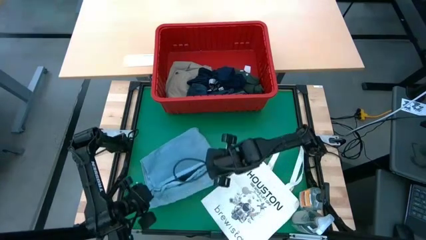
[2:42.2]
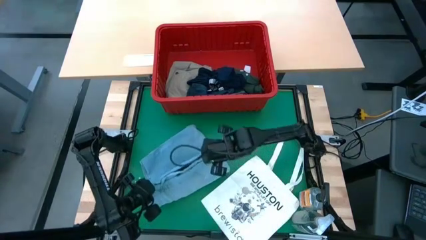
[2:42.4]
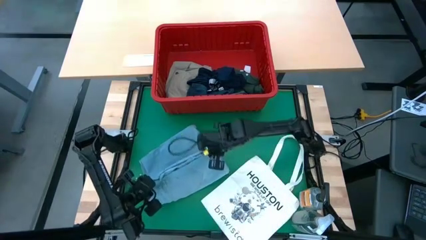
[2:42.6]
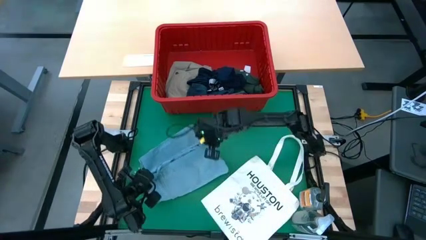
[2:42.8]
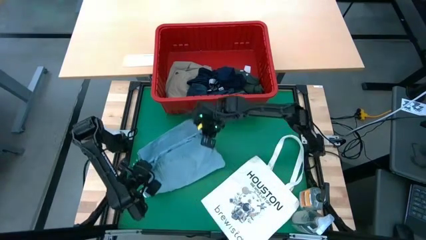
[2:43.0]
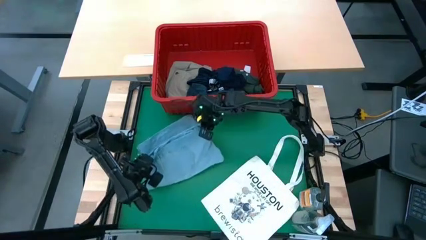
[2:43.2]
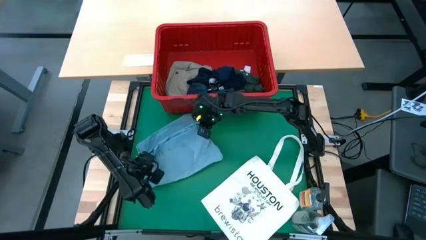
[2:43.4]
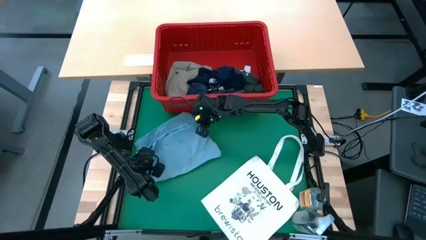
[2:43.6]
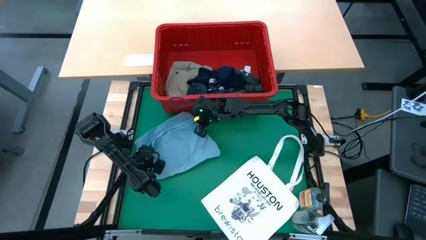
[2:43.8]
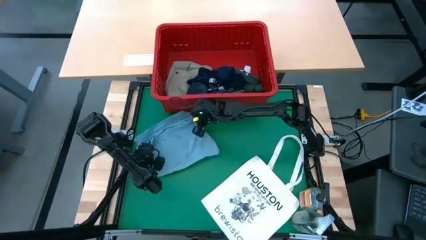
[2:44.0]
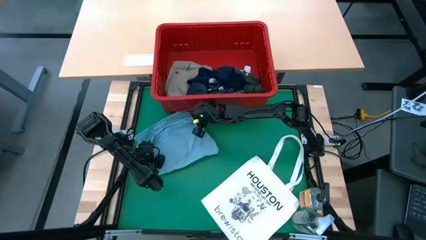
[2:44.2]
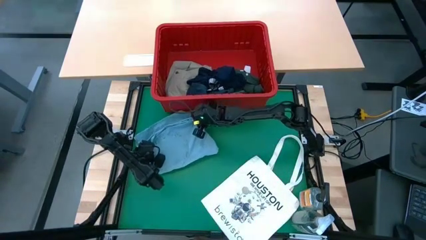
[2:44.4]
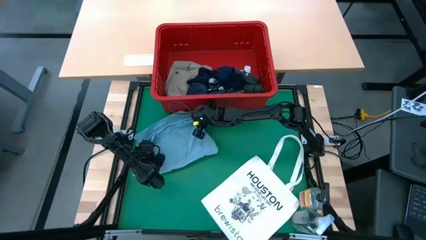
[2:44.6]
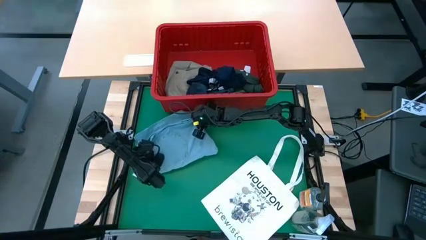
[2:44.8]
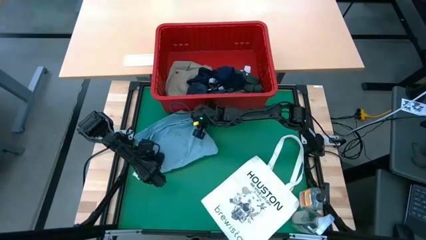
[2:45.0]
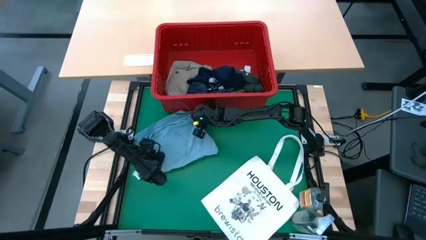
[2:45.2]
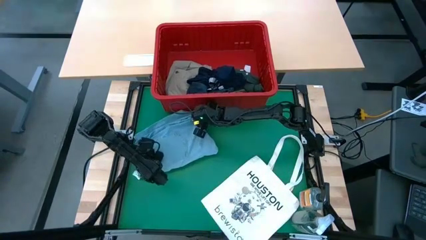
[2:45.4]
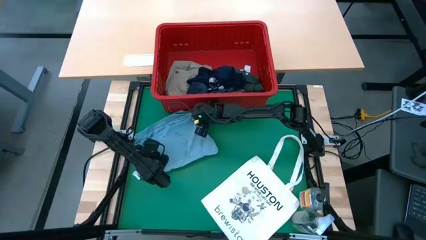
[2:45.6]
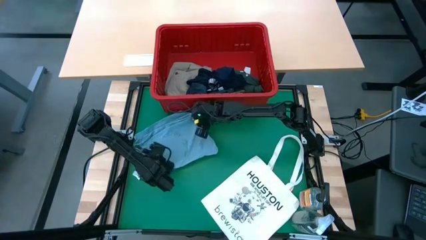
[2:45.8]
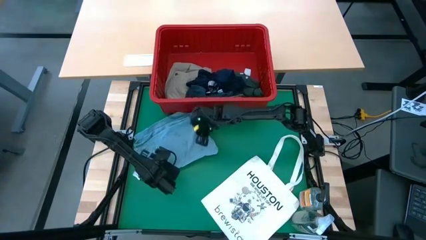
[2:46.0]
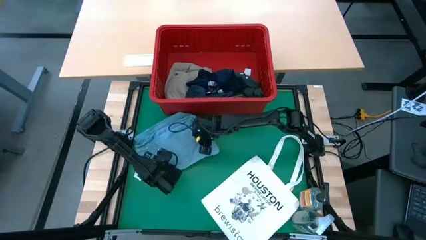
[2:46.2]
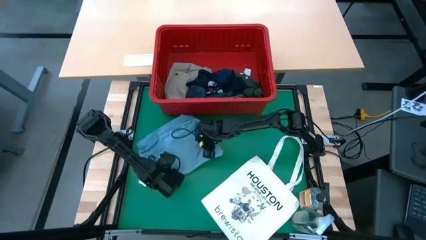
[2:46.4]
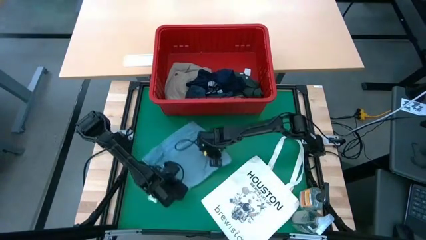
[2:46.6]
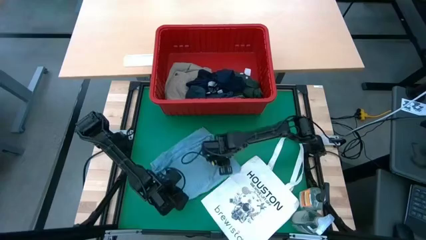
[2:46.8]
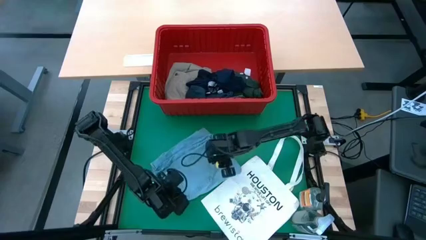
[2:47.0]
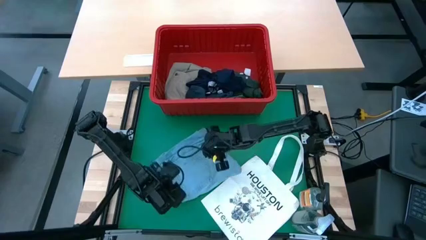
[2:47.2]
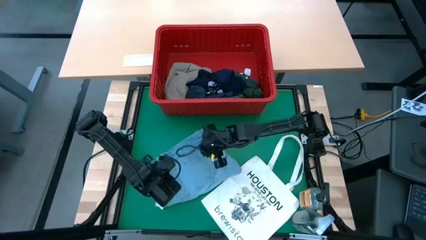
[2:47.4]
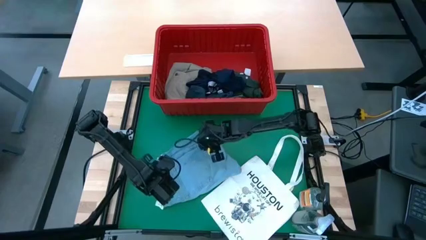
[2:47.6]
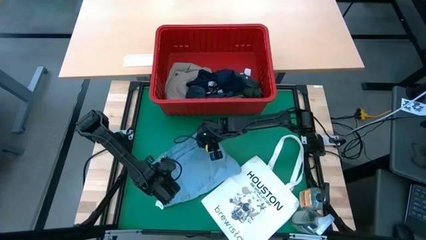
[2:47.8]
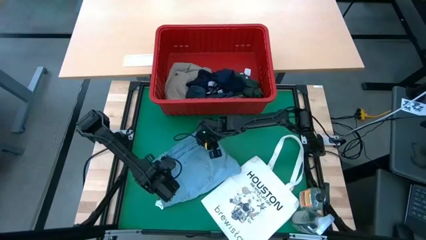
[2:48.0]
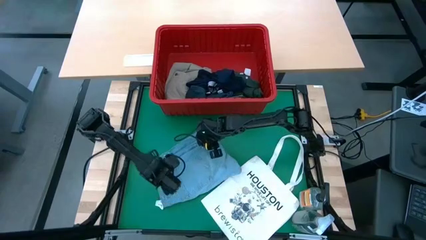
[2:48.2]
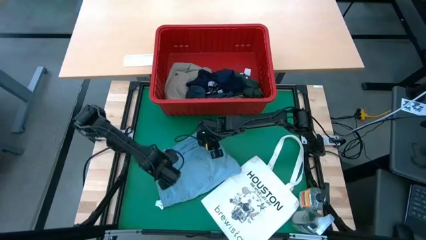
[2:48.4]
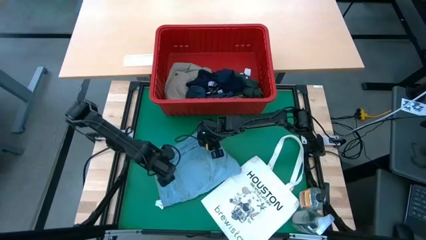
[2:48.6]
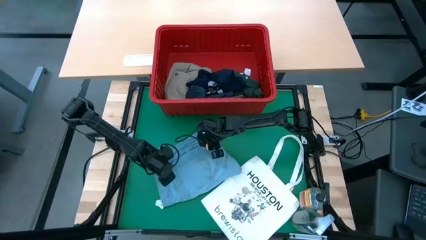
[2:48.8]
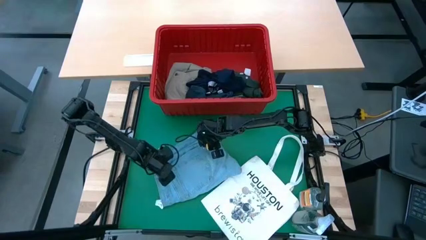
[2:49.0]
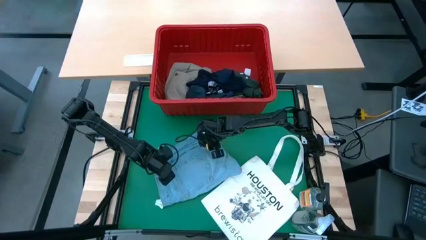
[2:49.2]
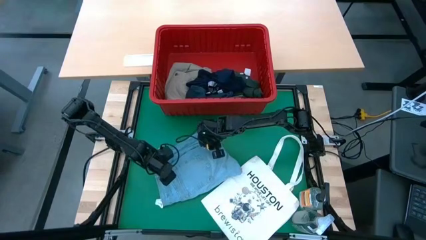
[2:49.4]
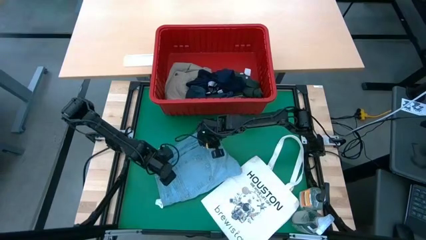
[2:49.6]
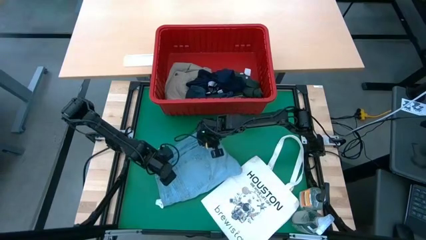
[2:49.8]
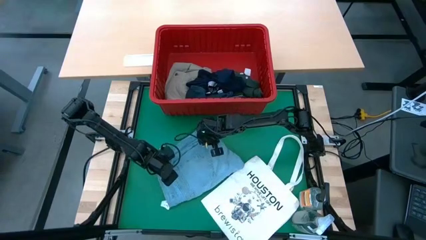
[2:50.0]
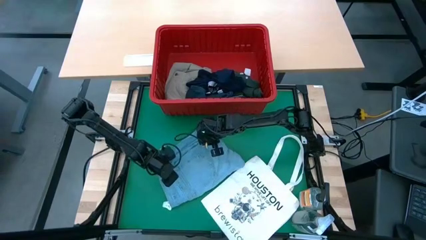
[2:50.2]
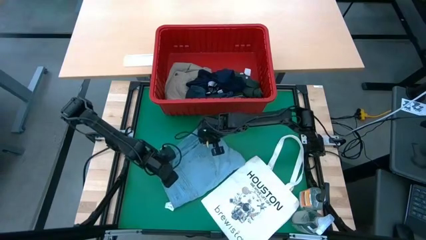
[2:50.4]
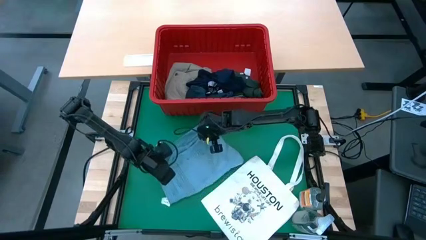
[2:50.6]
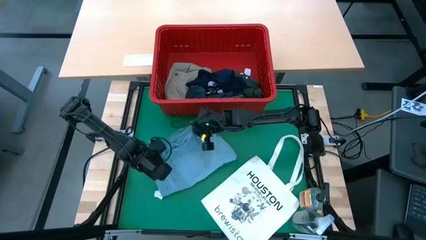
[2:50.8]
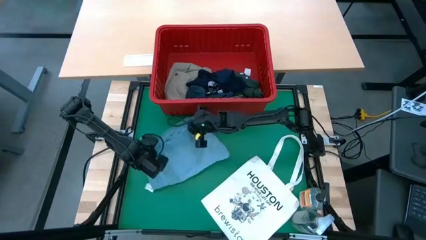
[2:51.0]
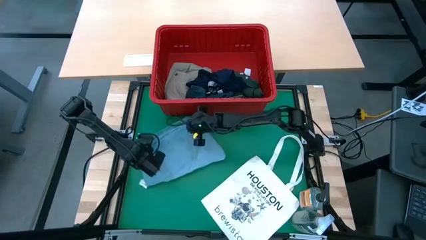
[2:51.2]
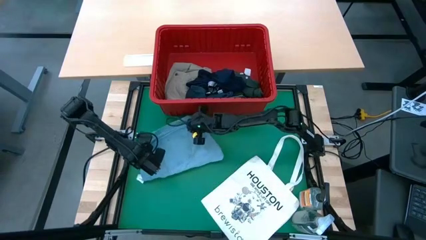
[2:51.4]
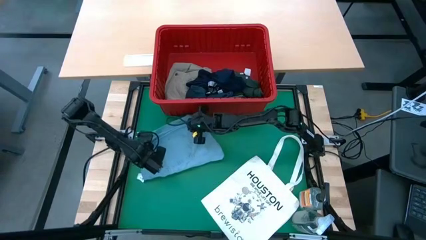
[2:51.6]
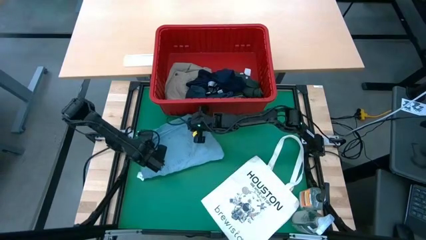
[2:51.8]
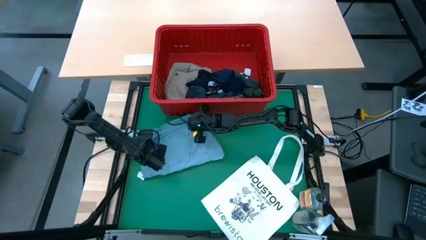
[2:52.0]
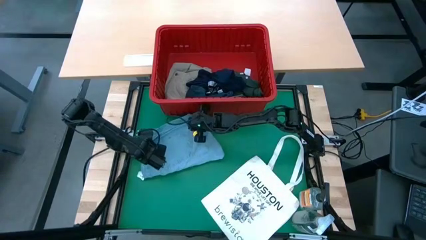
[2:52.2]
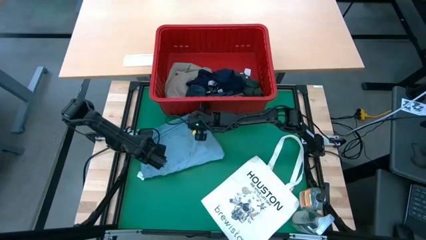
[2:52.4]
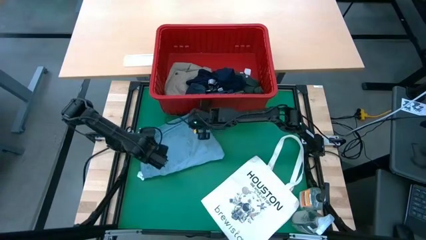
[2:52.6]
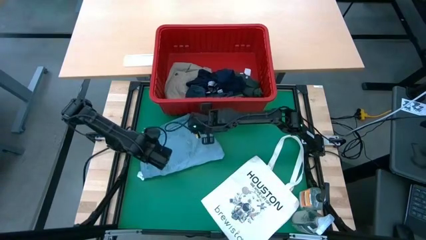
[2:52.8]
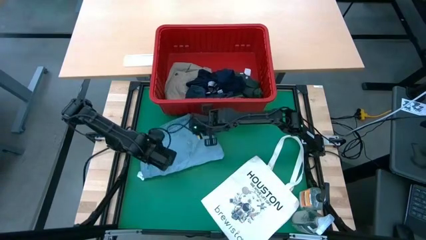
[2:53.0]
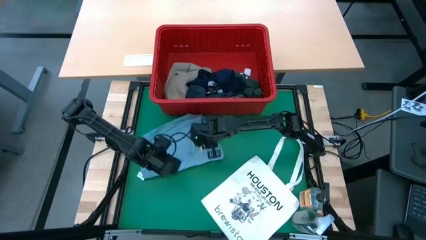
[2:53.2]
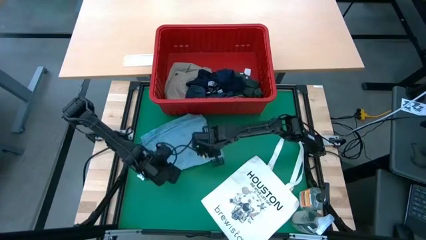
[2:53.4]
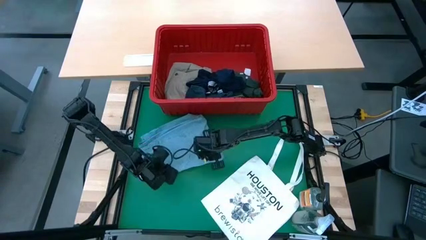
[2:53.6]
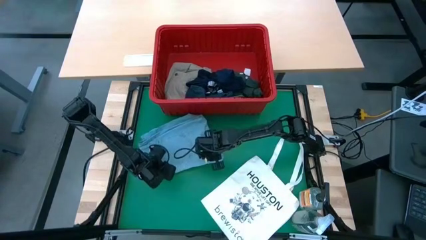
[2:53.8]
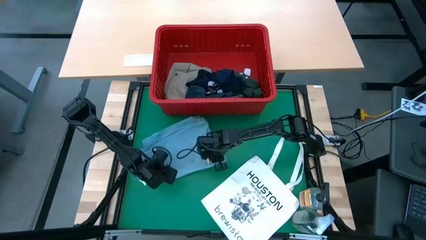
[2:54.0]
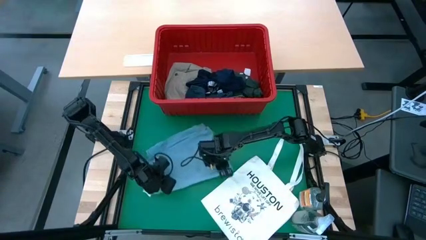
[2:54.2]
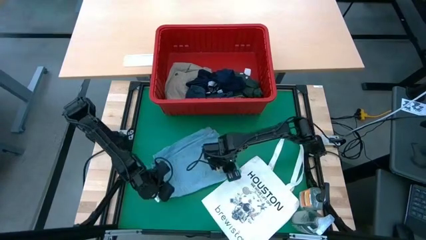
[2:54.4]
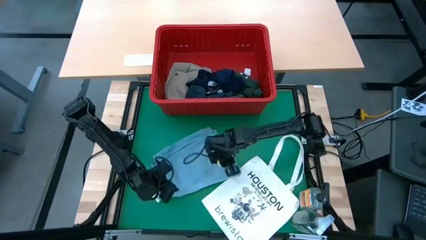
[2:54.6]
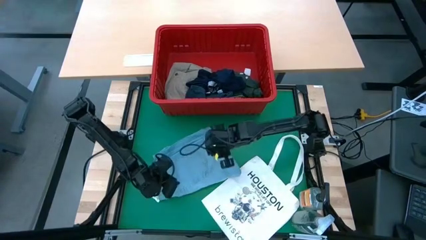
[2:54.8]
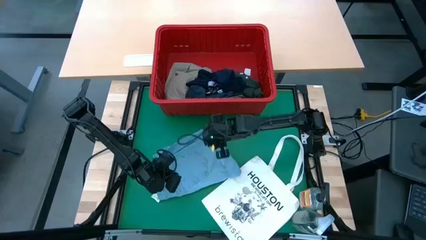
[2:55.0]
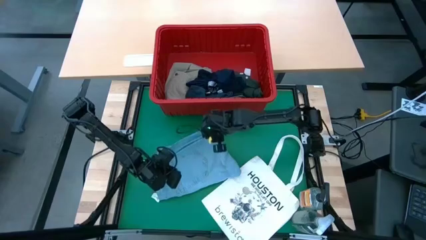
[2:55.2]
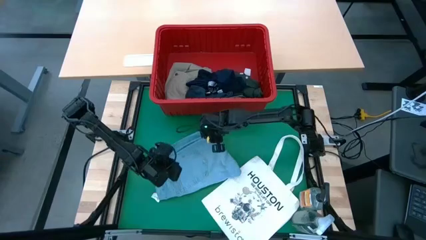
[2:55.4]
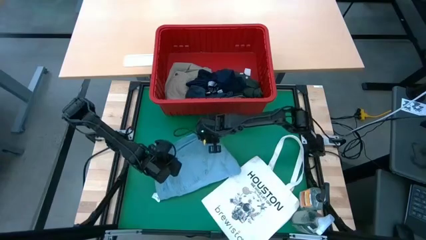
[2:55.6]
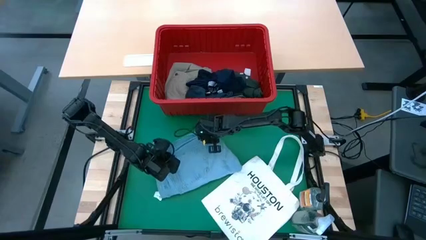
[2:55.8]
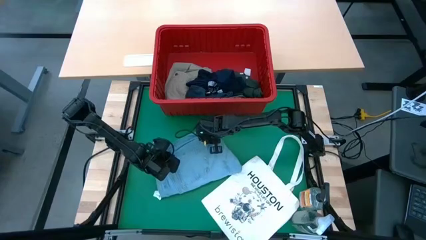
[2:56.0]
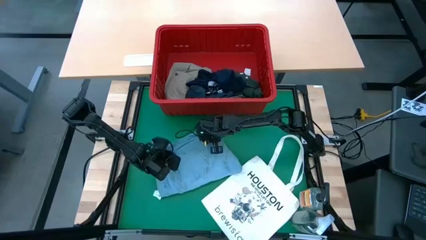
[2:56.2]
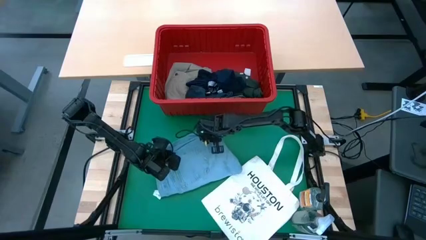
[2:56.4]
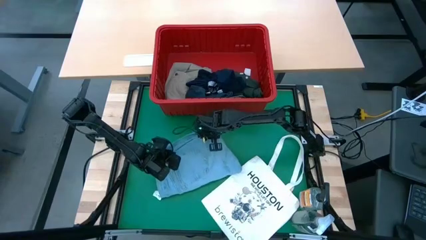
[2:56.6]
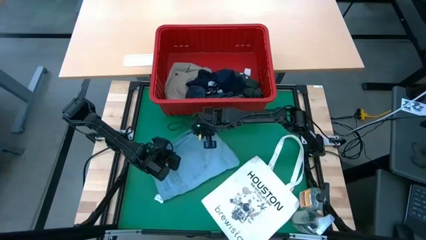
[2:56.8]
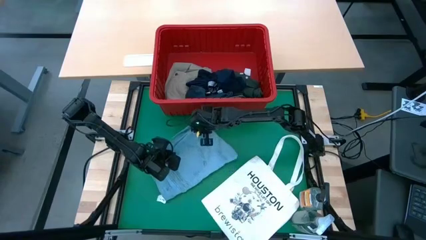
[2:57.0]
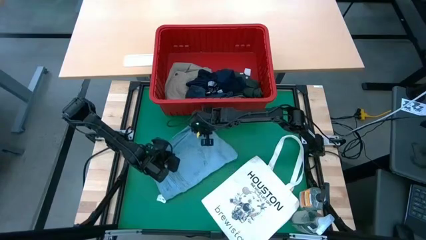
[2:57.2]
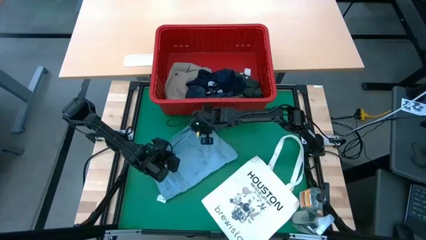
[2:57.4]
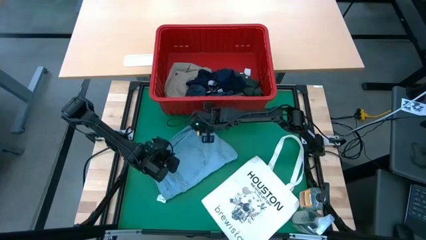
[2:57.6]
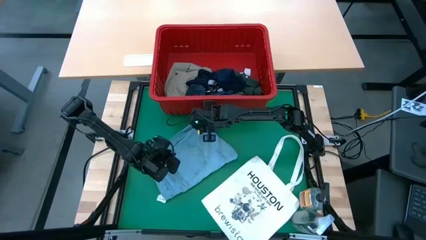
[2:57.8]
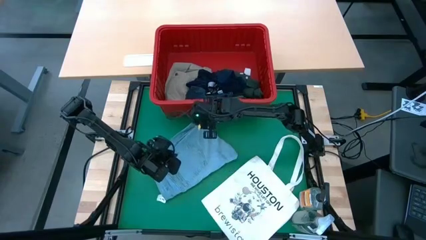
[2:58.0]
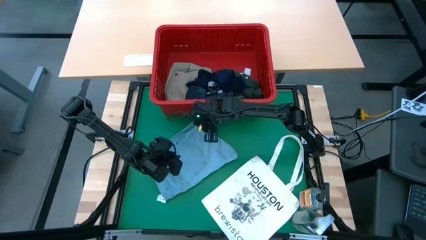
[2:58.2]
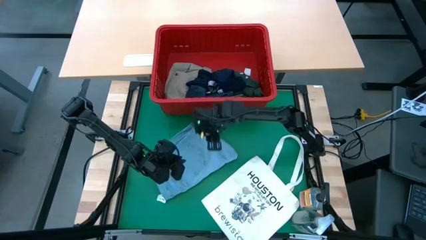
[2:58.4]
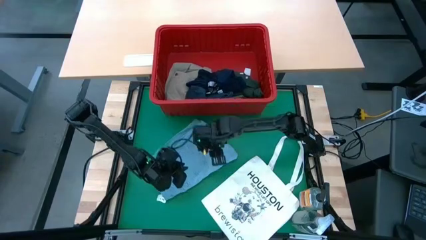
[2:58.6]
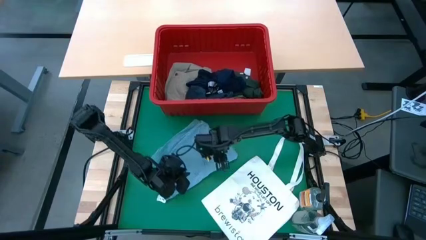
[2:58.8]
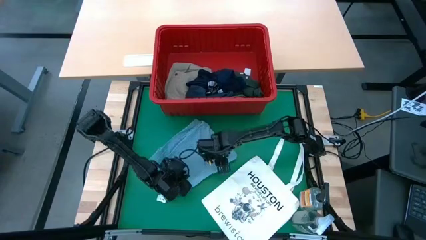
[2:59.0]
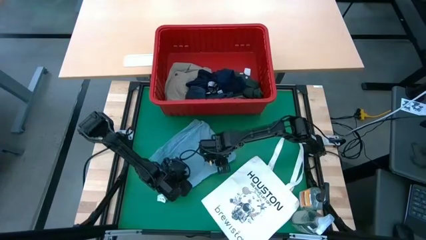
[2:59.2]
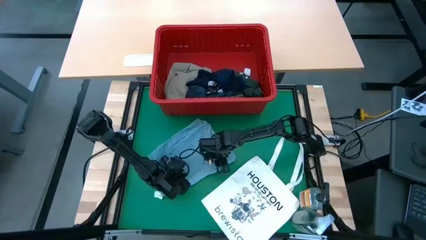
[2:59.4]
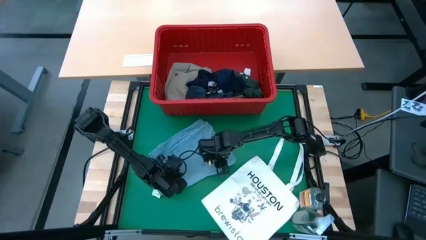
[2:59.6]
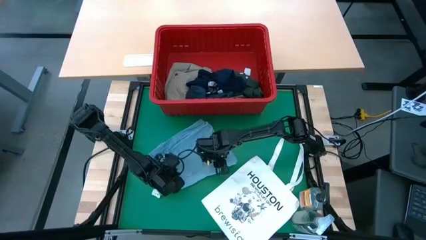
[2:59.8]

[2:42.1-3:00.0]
Task: Fold Laundry from Bin
Fold the blue jeans
